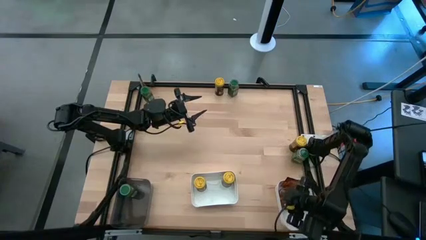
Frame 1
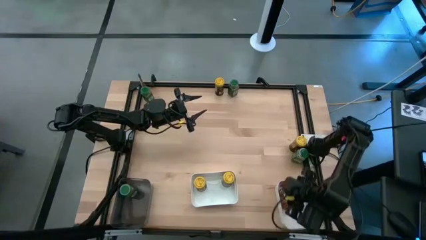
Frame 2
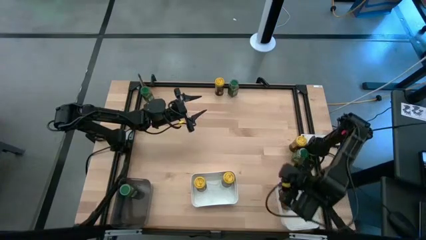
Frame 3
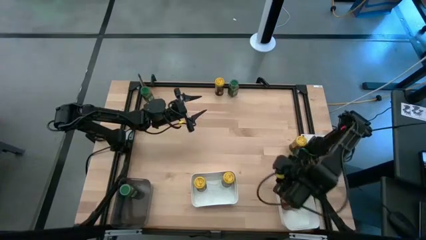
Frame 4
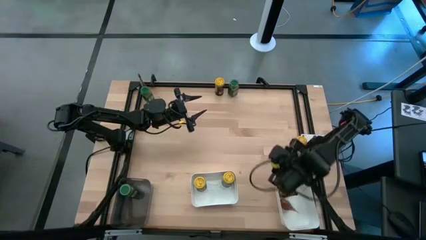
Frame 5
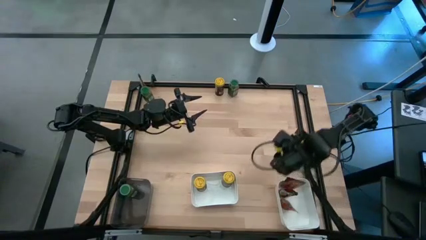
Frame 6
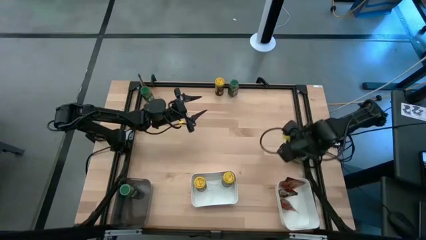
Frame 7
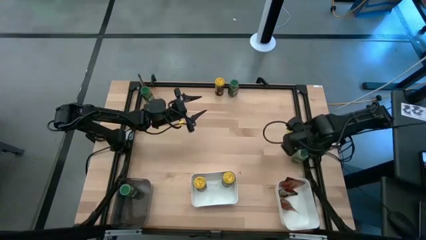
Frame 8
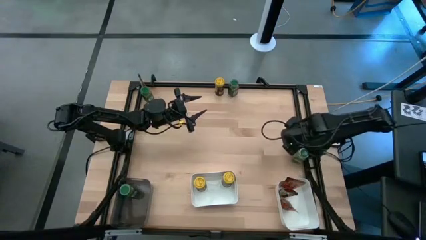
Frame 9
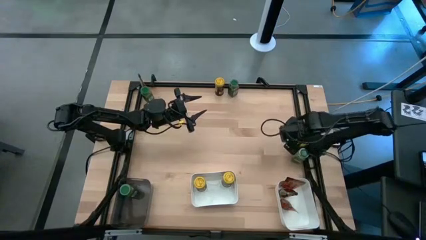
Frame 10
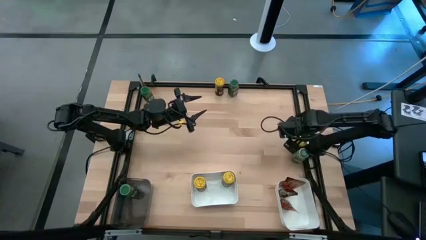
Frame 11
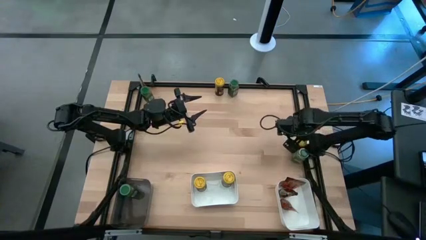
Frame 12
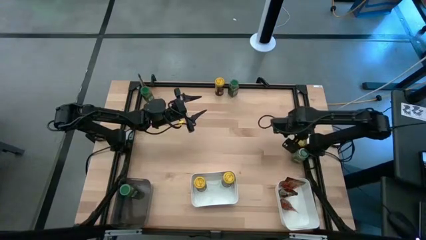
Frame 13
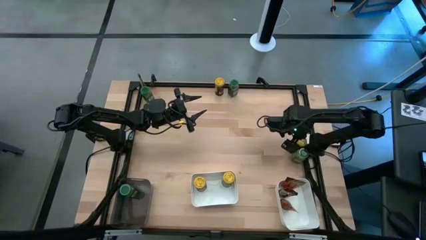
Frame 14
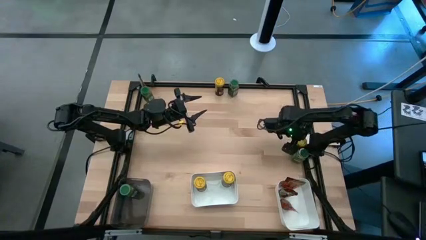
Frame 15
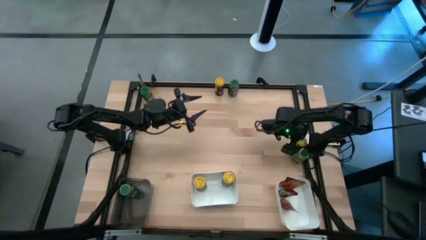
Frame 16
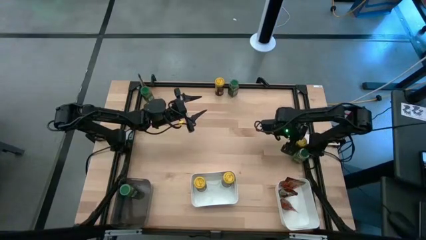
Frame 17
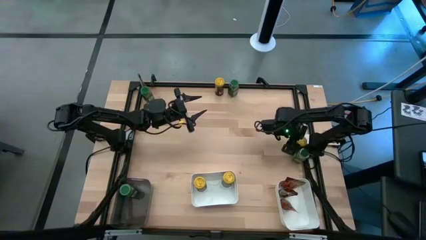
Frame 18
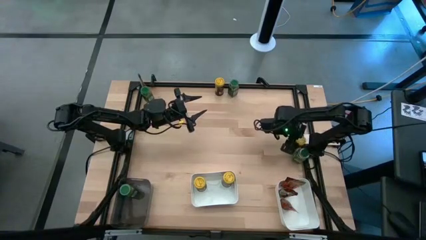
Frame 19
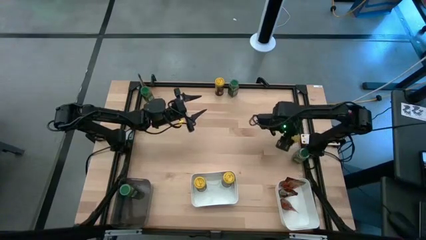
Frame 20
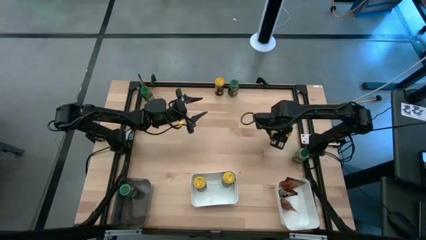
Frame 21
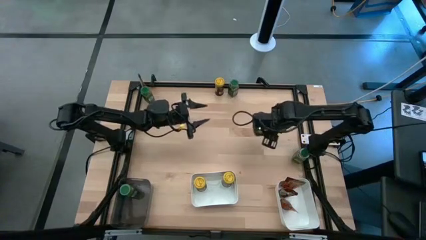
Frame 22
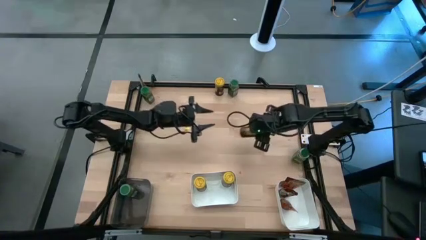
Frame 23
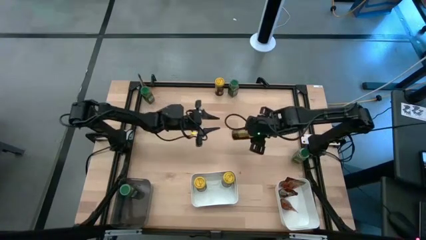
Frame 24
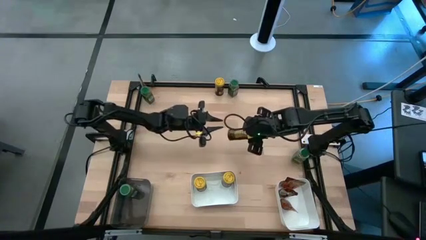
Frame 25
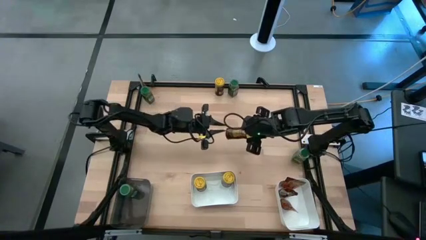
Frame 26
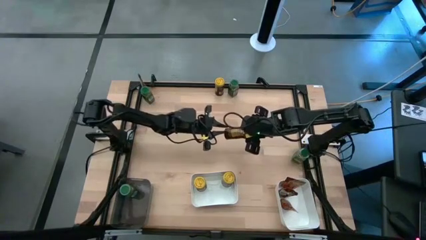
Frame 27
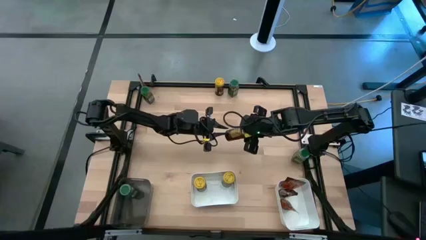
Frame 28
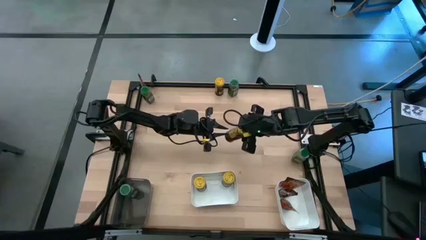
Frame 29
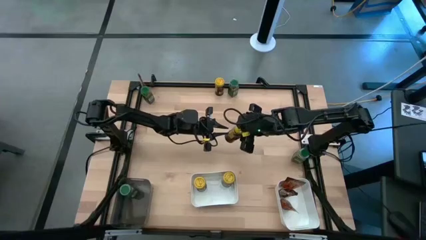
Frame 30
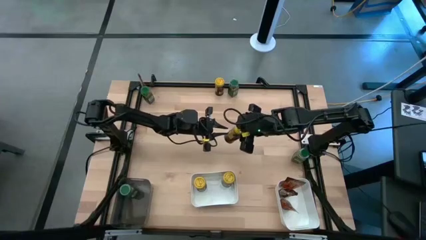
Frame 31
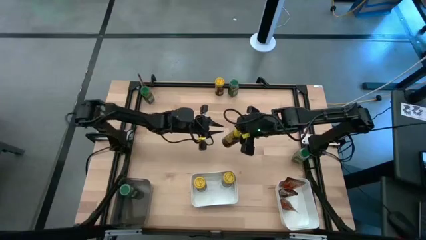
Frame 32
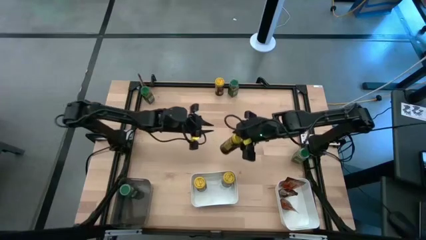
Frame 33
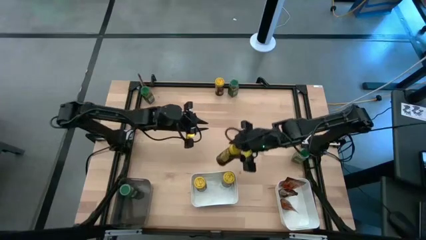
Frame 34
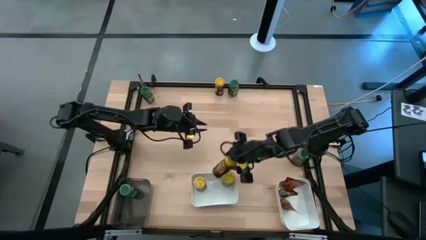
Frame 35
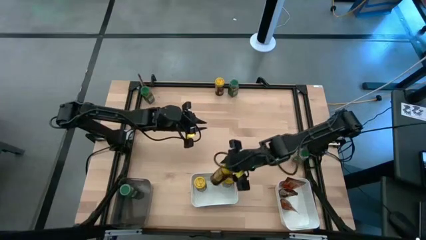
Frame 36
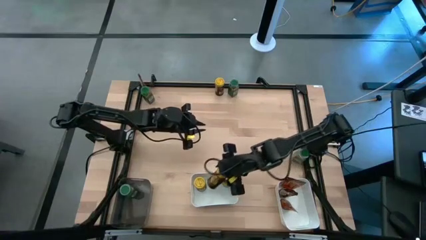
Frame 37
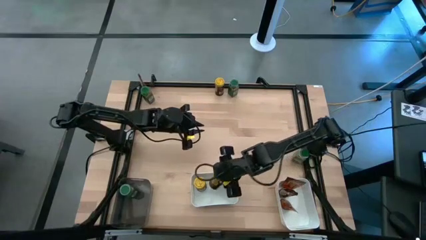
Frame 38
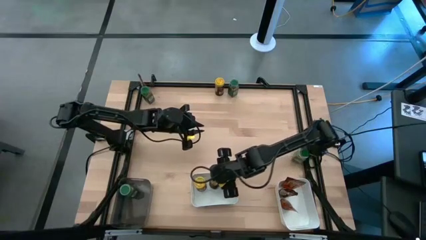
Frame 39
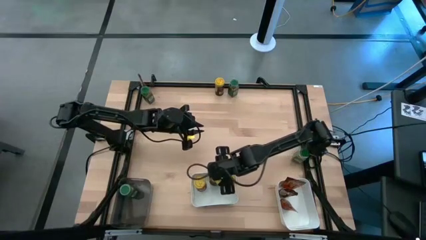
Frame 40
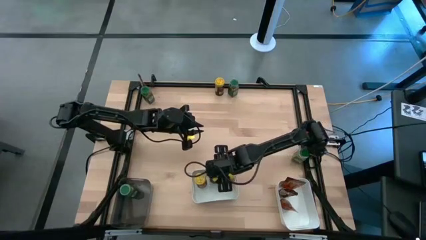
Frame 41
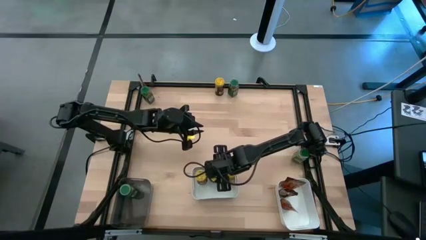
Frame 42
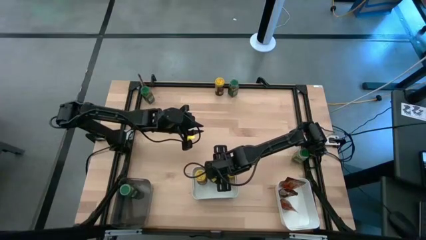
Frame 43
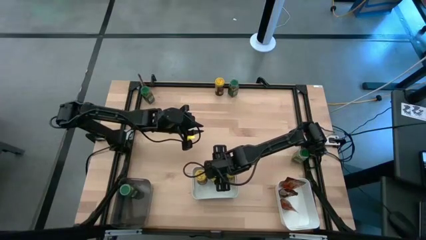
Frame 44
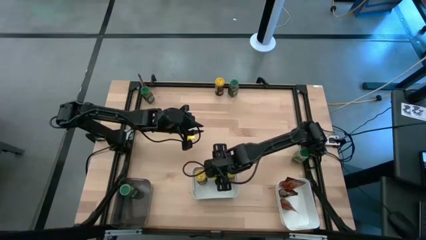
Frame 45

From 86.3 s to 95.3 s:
Task: Sort spices by type
Put the bottom yellow seasoning bottle into the left white bin

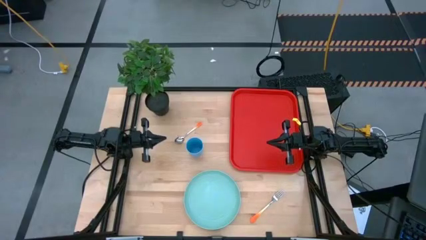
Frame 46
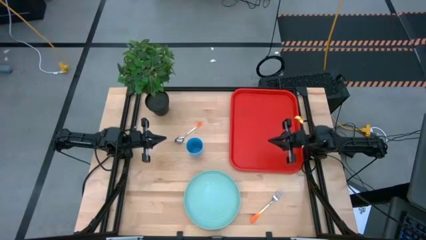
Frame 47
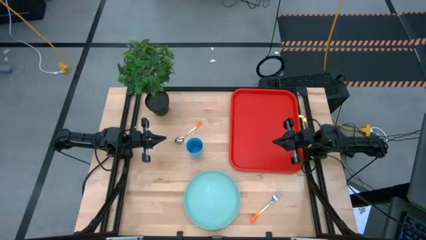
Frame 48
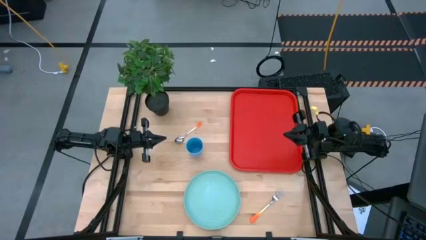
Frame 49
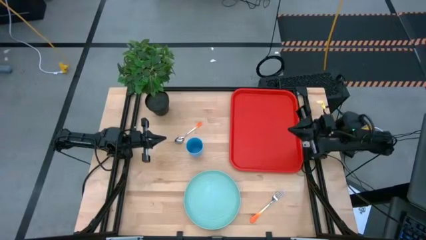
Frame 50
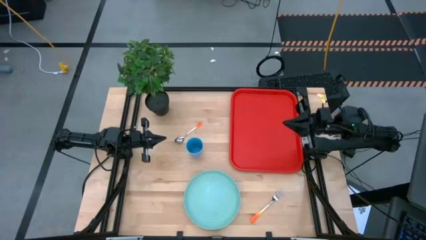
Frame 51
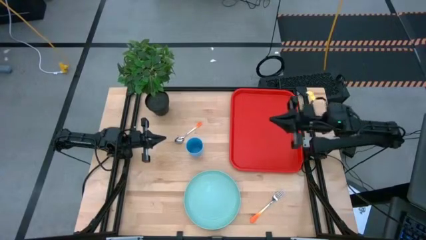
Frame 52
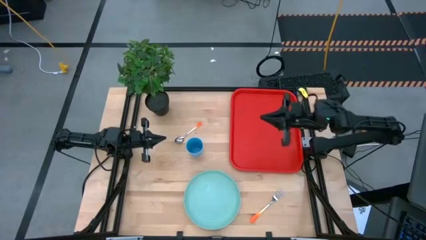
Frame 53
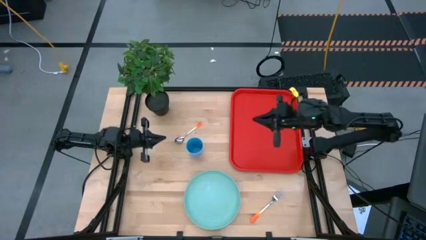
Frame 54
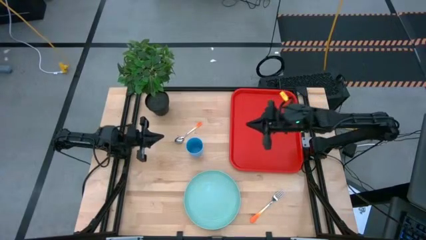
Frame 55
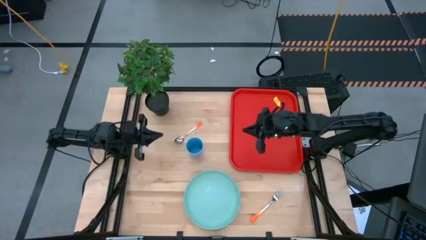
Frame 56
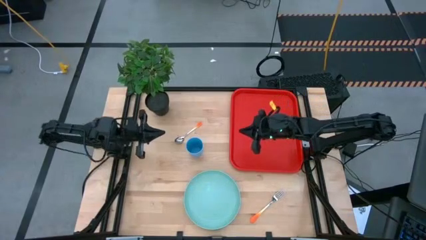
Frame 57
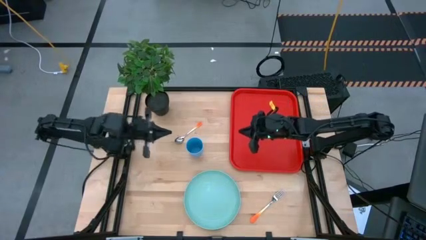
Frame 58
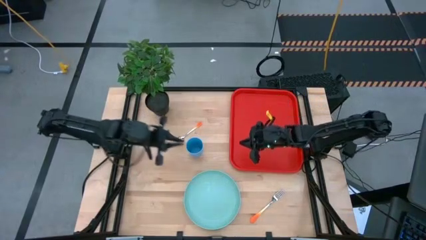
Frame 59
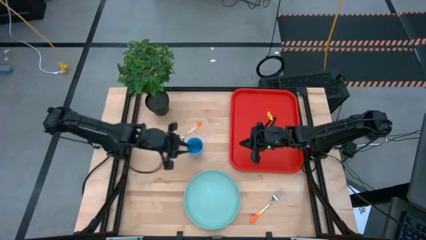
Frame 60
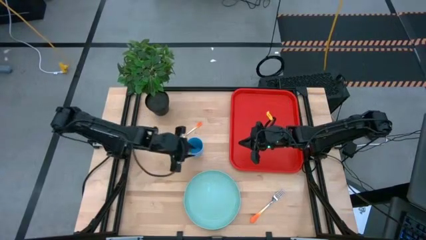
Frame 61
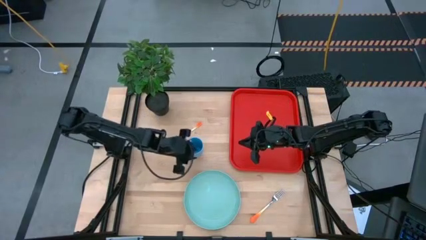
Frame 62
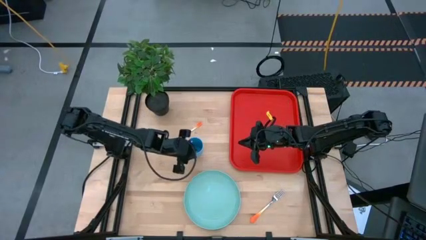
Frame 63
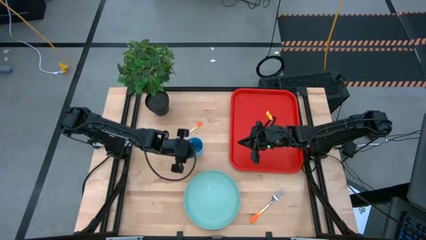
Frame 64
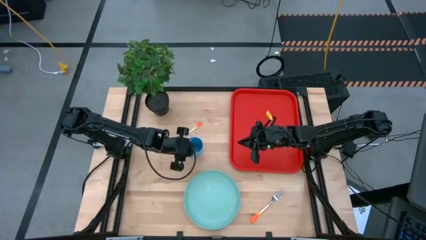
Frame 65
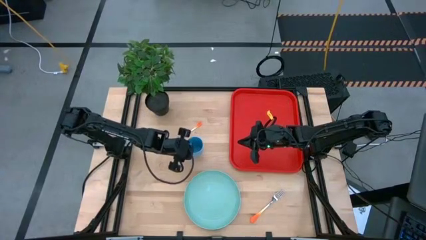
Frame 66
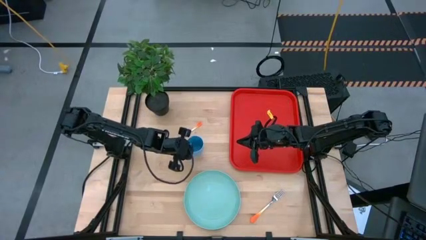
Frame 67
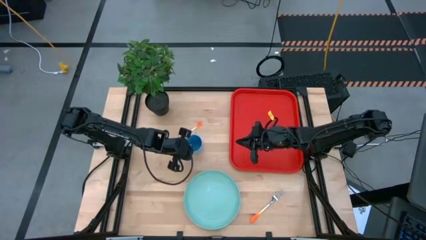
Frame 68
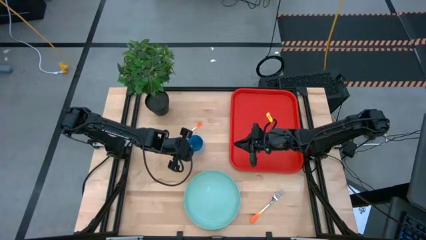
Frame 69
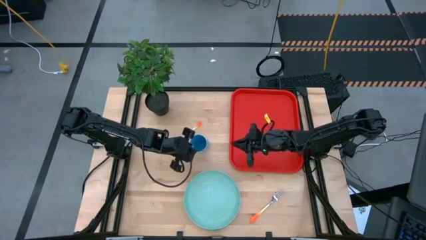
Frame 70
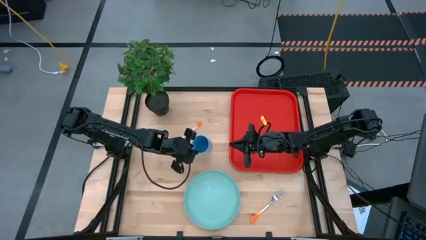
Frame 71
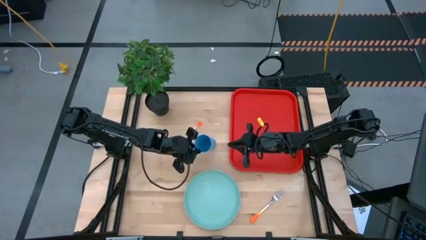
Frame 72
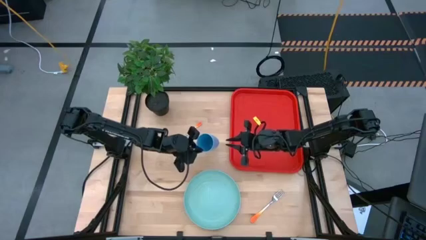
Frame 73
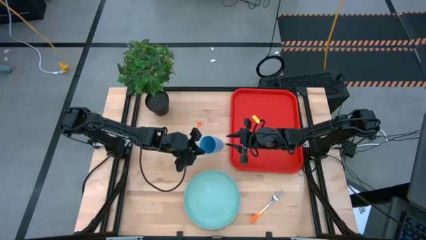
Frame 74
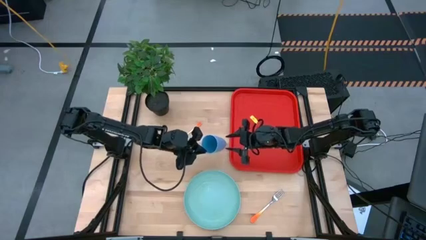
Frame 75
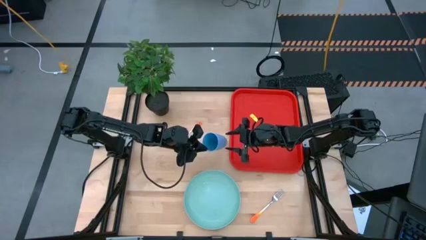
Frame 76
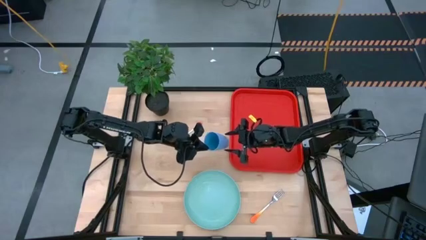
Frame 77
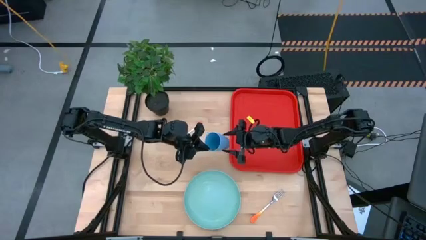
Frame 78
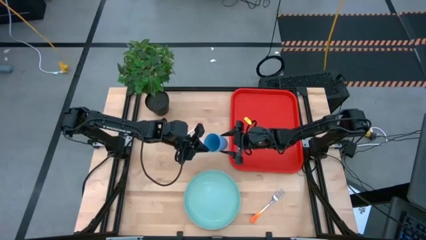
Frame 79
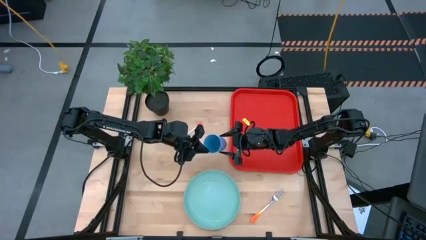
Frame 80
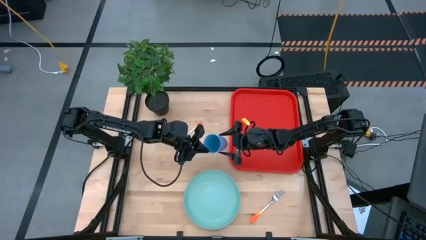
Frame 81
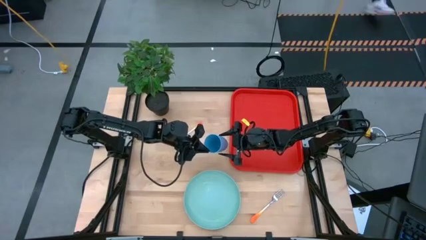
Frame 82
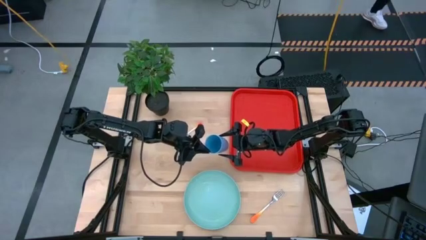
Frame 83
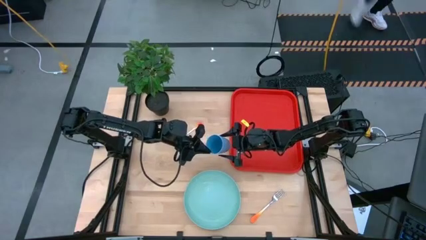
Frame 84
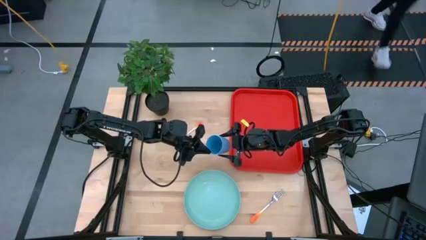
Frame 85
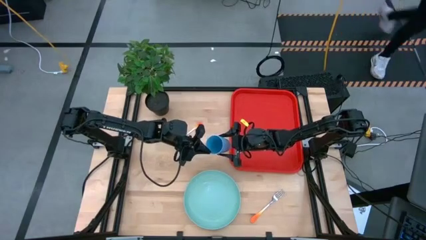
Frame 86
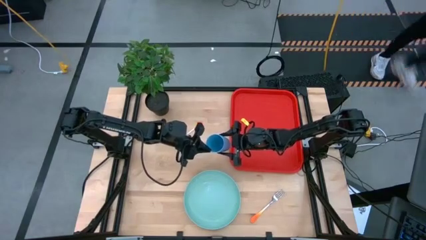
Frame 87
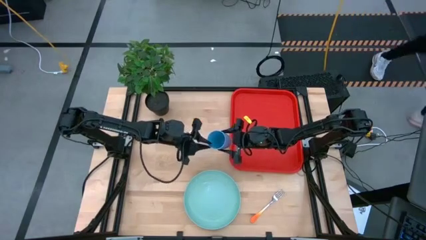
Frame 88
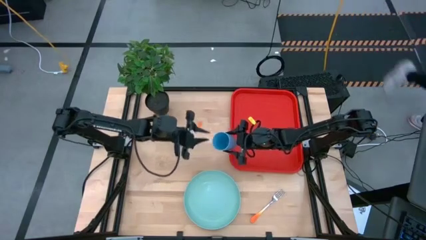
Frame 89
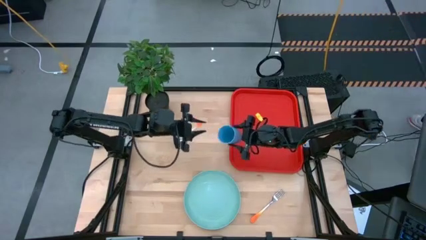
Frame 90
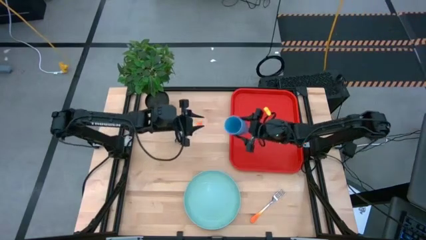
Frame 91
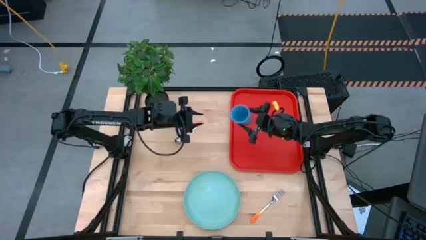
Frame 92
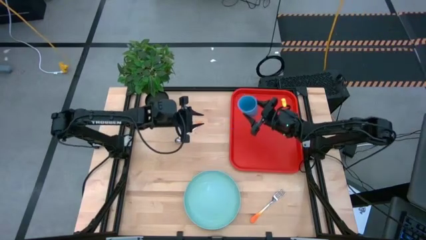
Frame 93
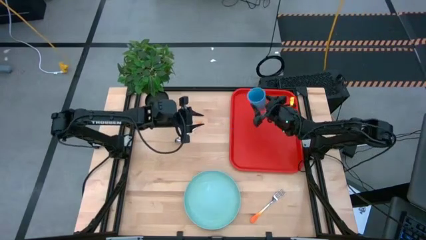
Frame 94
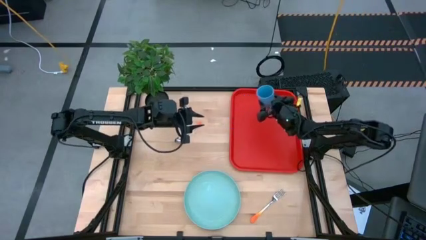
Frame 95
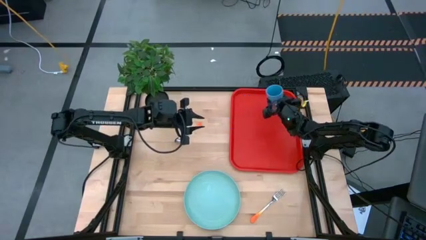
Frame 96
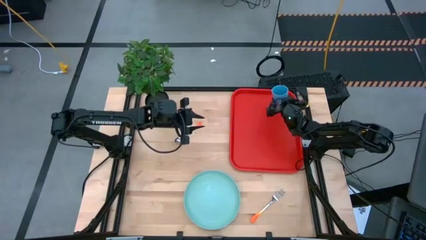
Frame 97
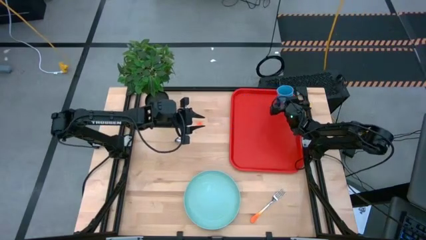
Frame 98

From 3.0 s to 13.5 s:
Task: Pick and place plate/cup/fork/spoon on tray
Put the blue cup on the red tray
